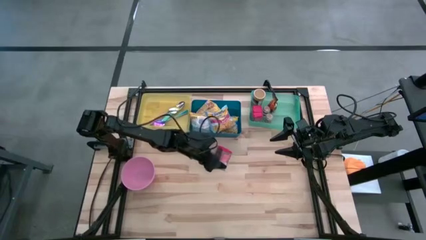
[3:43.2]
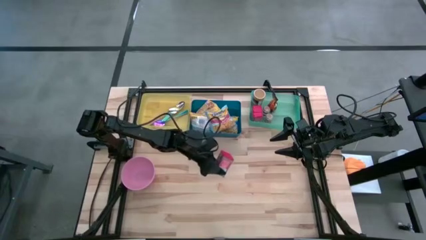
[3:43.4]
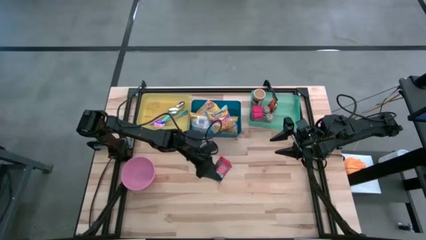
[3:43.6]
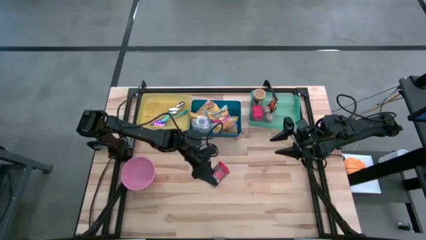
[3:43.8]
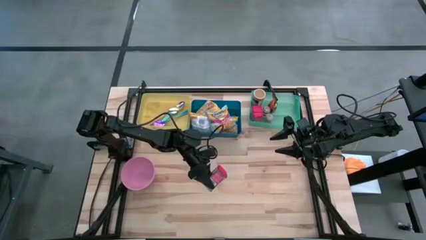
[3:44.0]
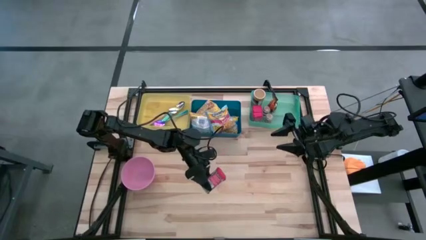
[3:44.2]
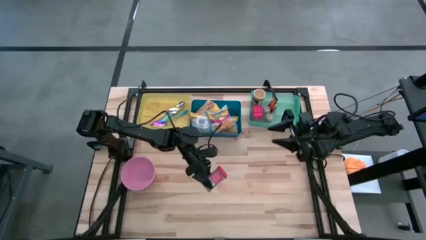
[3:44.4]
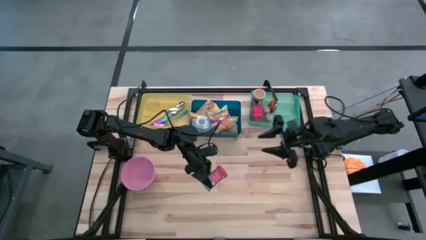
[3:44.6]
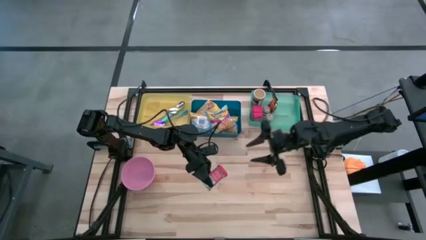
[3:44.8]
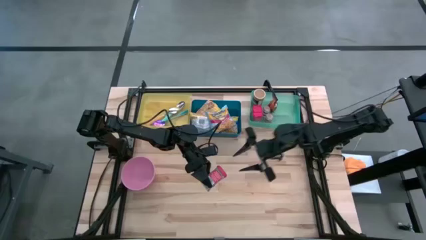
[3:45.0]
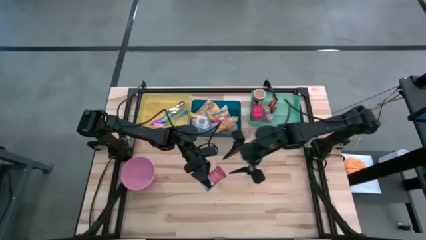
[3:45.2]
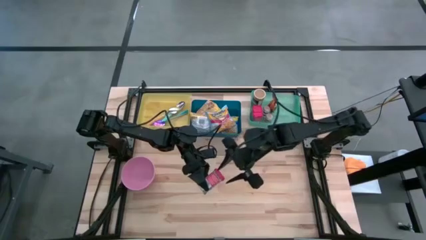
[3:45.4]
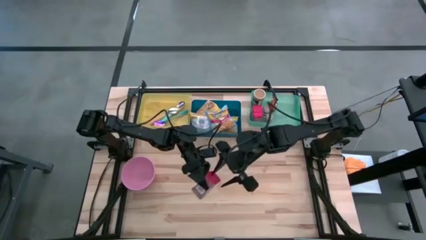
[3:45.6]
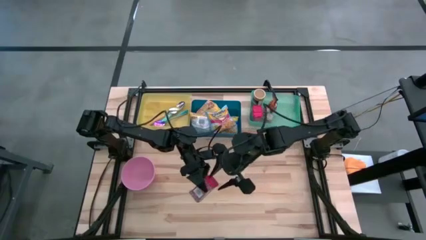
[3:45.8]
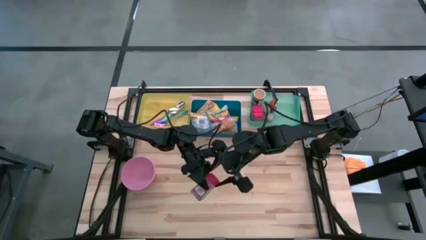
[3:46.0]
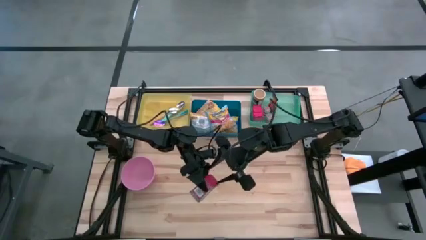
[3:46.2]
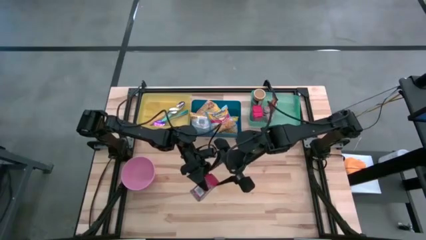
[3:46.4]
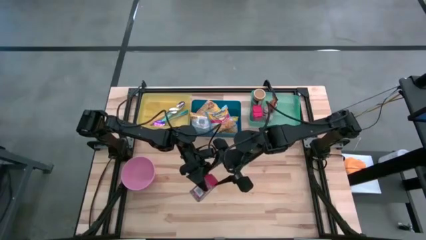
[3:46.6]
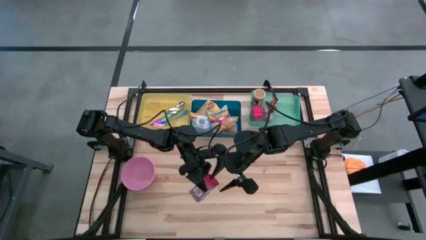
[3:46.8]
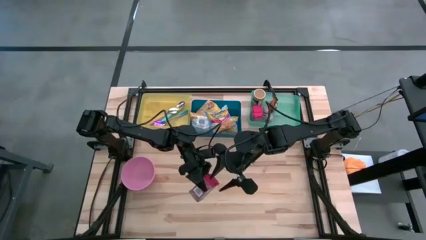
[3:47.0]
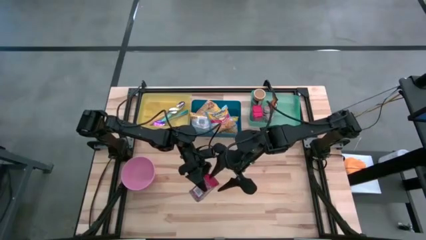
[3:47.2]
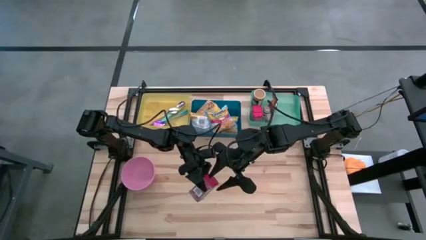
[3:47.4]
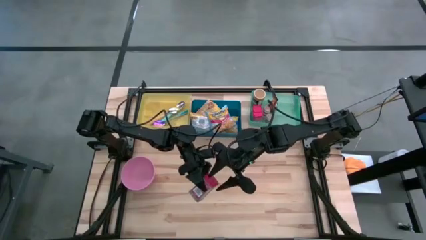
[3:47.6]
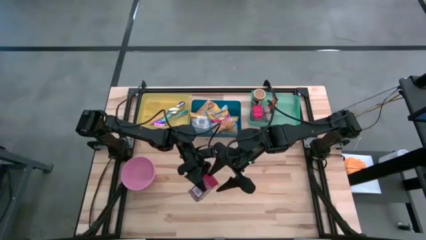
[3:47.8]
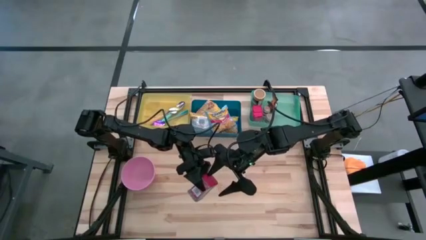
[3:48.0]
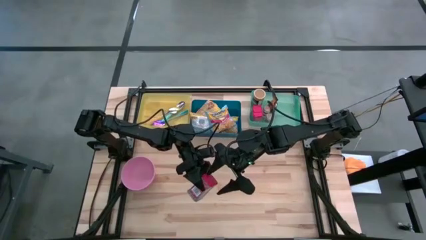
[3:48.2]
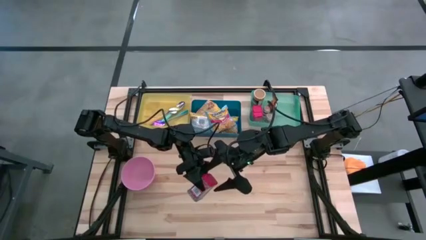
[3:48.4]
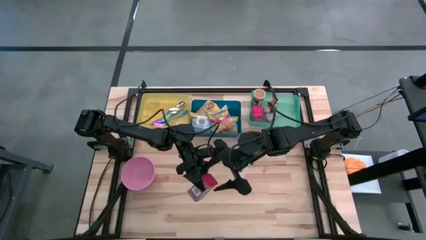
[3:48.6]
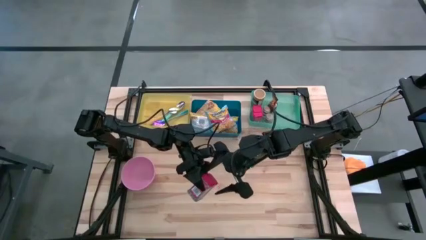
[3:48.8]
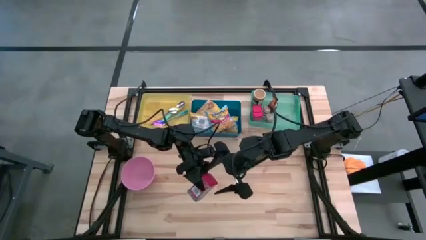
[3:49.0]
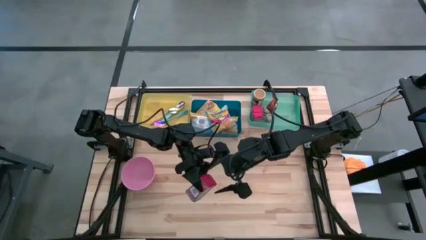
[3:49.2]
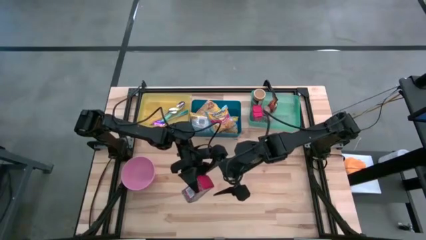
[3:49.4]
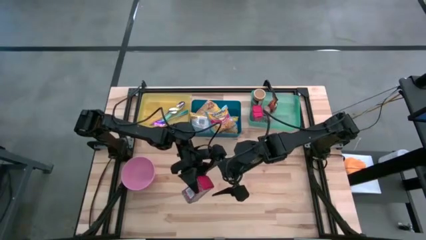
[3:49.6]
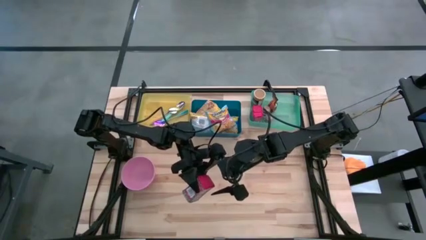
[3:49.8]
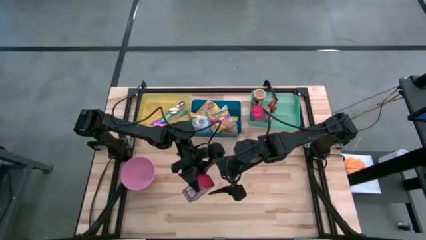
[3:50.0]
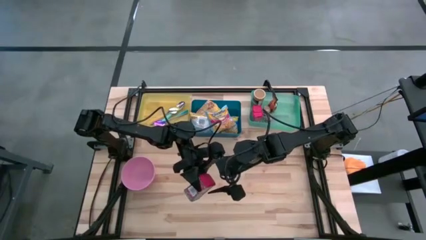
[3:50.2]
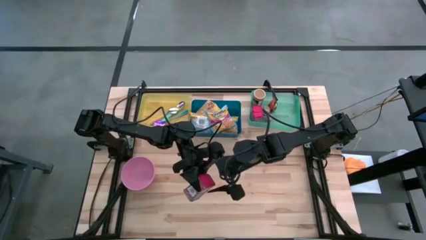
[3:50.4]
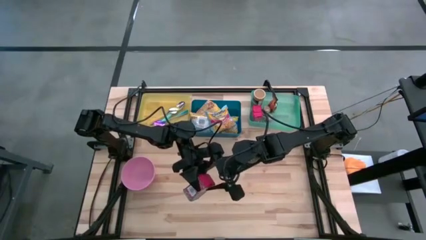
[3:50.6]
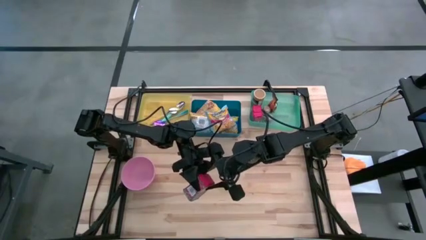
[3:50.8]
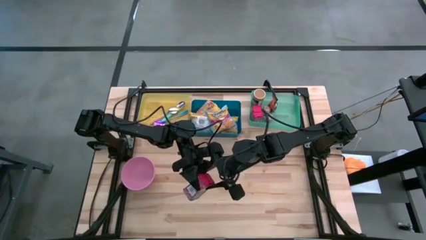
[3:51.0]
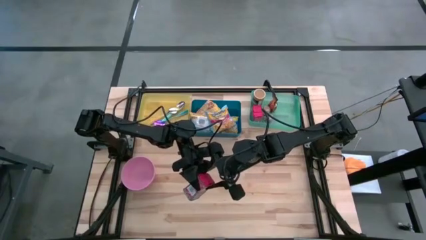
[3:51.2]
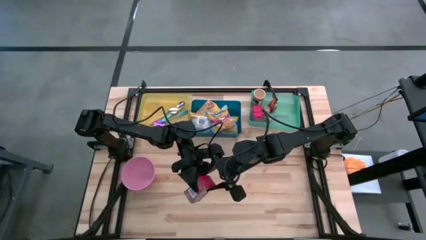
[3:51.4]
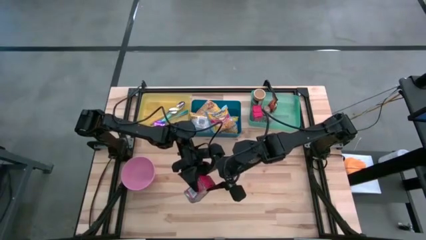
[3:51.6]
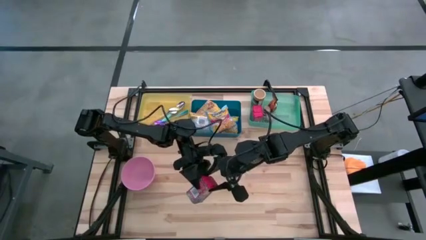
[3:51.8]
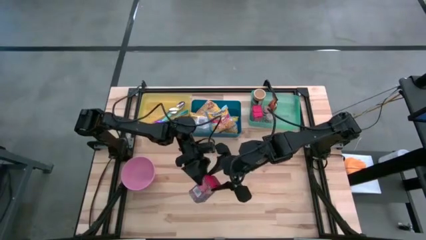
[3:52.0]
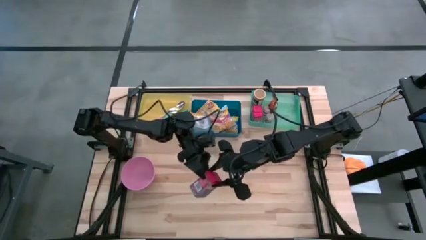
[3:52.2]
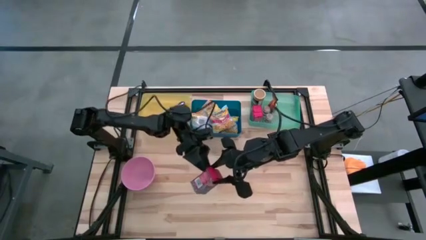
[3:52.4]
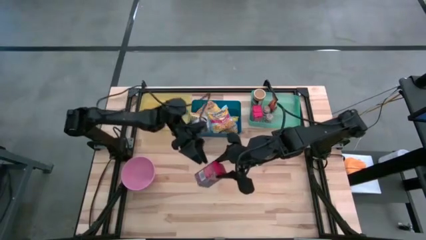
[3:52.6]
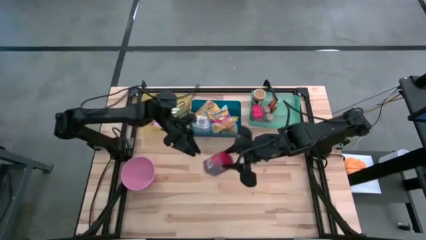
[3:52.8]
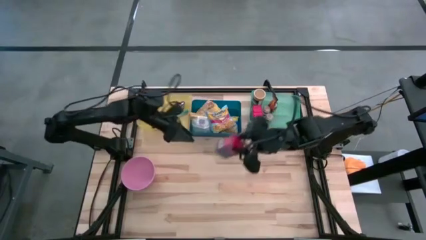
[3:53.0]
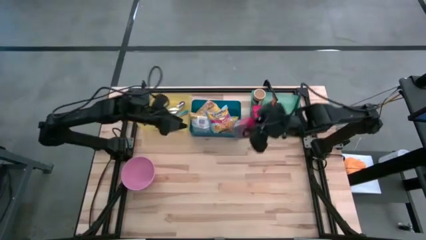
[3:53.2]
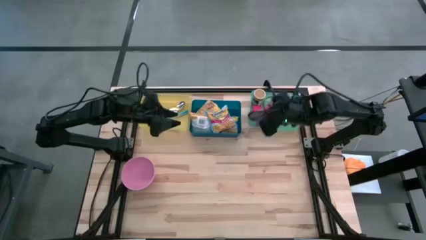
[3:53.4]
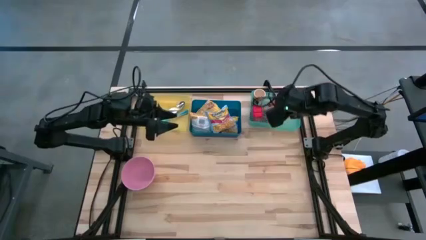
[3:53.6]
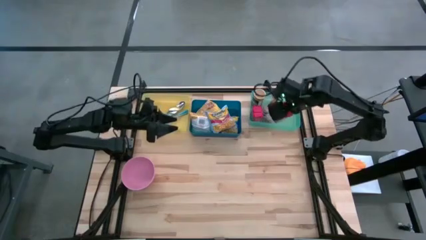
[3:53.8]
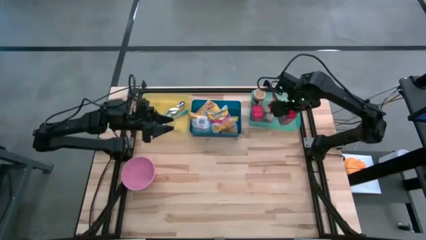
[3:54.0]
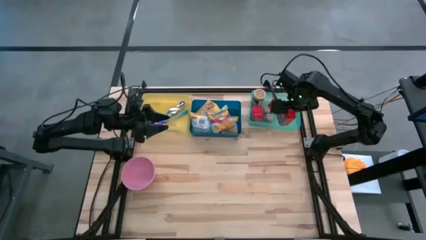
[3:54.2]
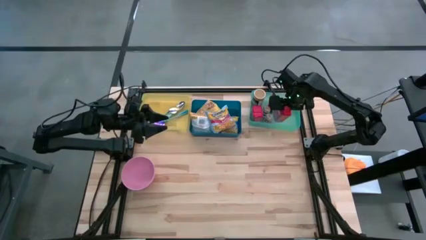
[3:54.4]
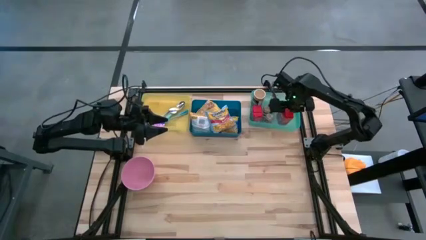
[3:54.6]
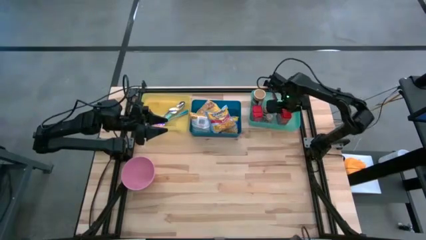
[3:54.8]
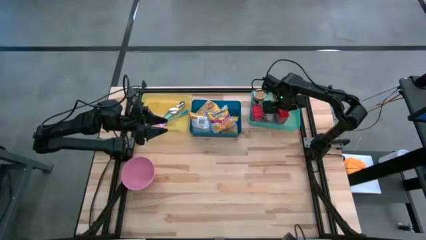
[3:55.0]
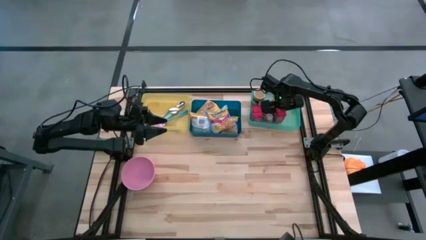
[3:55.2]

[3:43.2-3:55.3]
Put the red seasoning can into the light green bin

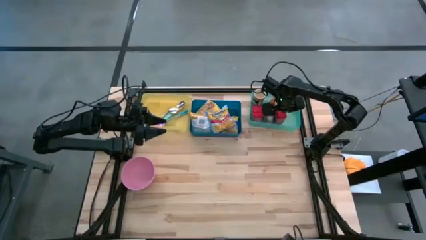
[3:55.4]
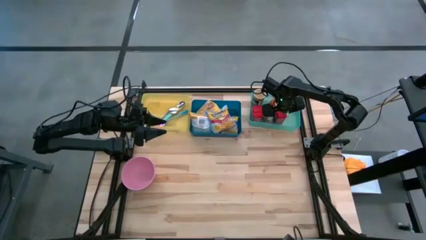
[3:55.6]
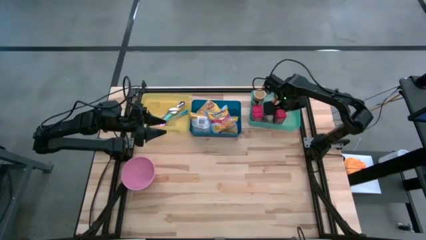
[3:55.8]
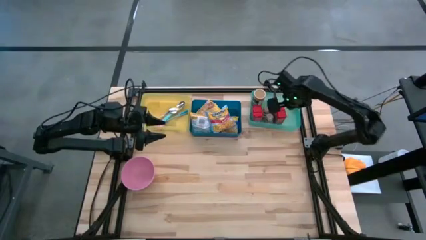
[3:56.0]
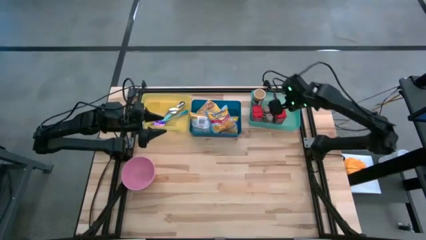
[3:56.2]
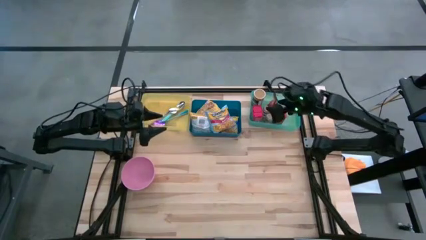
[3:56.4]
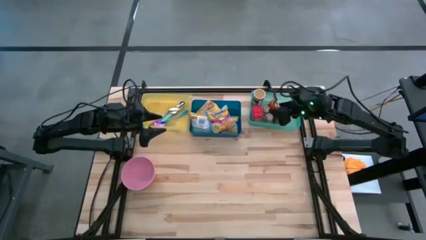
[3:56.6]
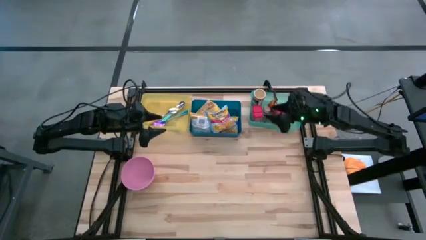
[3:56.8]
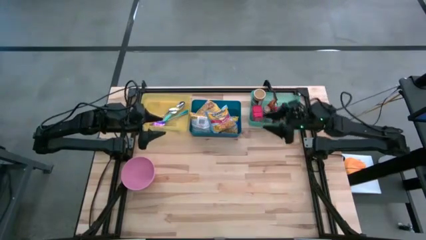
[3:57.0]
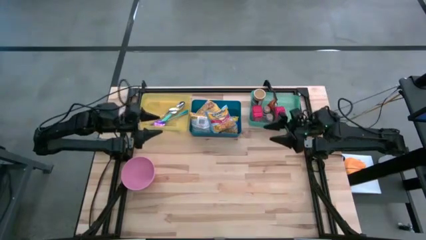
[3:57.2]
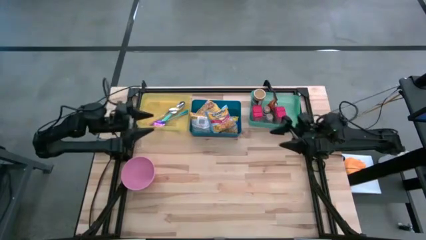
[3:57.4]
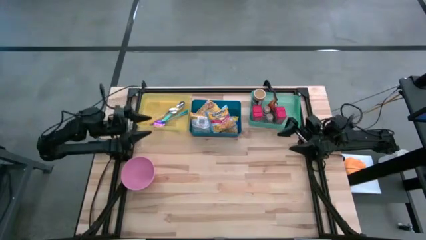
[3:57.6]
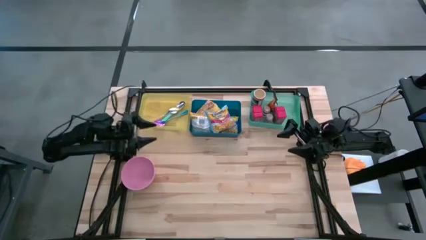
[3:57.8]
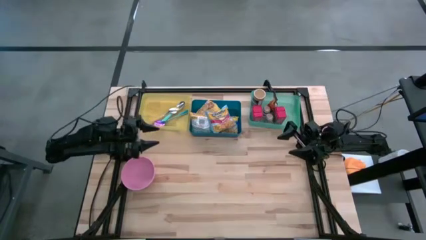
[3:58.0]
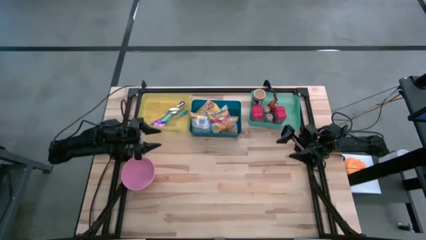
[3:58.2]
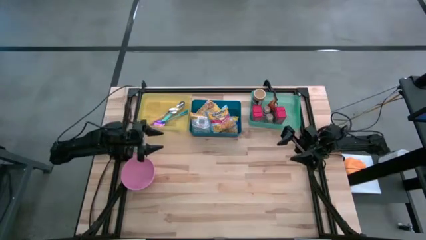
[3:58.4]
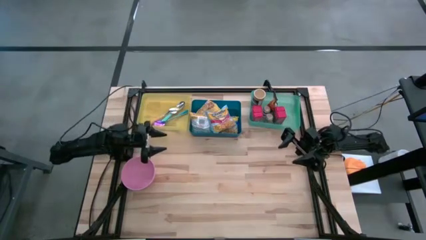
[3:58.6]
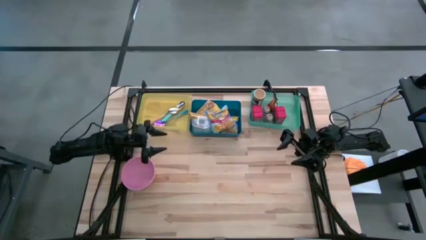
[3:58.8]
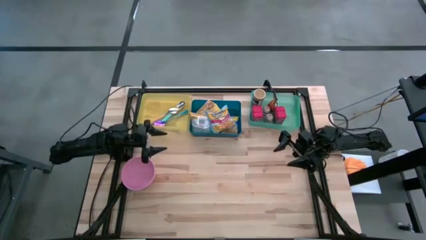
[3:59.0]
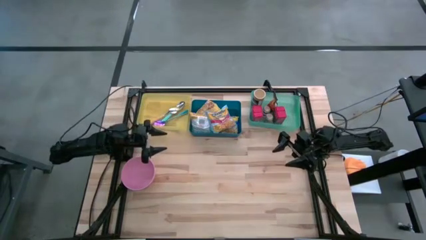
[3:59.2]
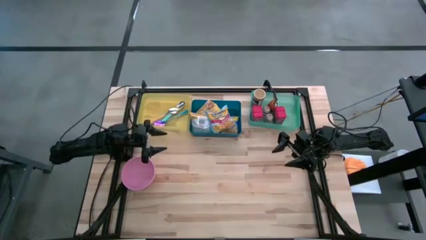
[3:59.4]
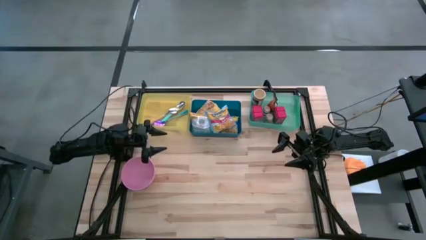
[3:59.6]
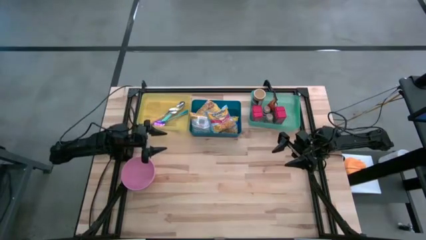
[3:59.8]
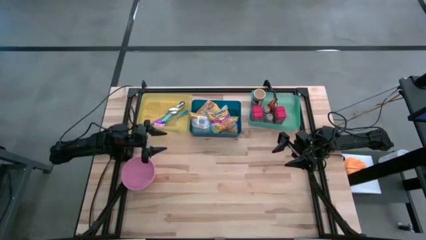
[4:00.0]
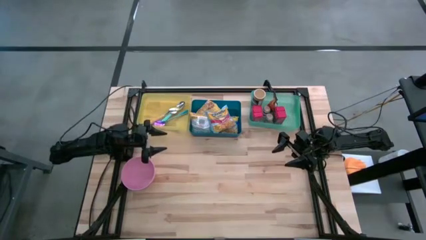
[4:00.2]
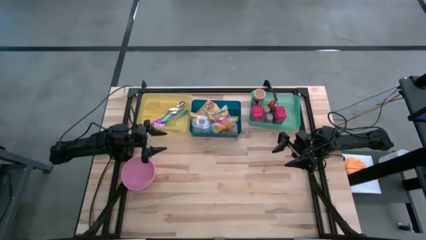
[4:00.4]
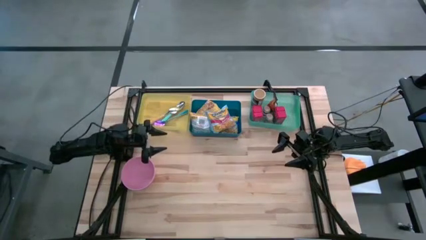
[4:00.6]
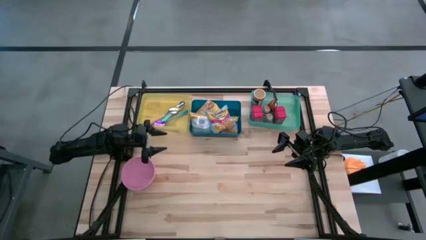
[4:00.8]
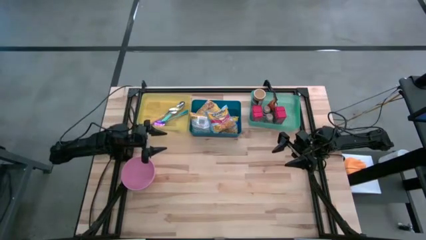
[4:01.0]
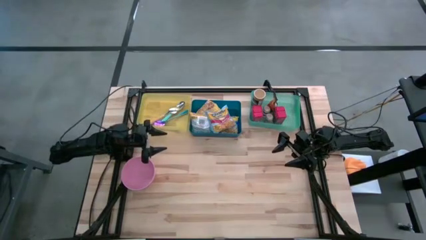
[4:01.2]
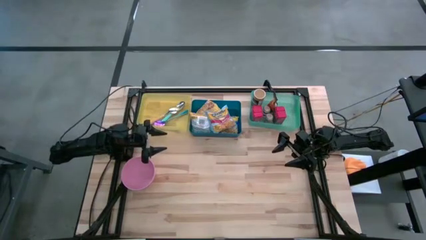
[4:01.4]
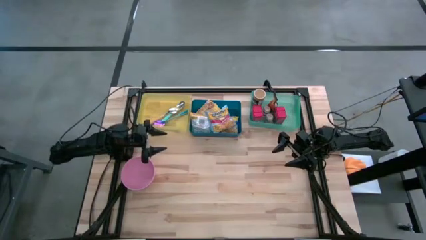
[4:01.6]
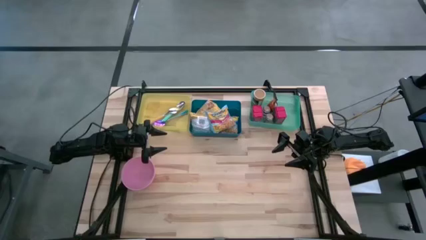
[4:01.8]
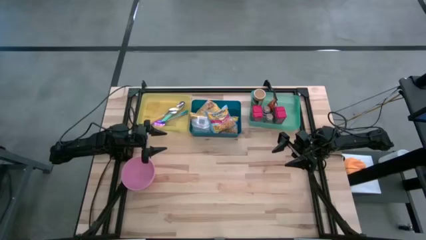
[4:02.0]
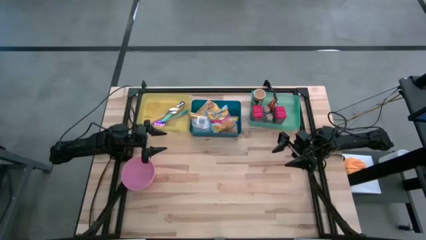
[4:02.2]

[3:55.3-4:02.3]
Return to Home Position
